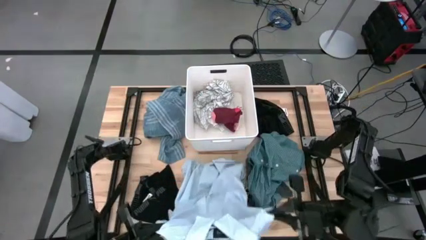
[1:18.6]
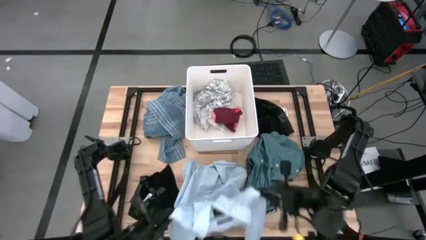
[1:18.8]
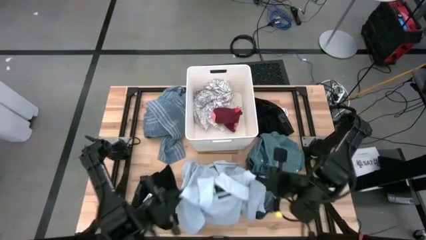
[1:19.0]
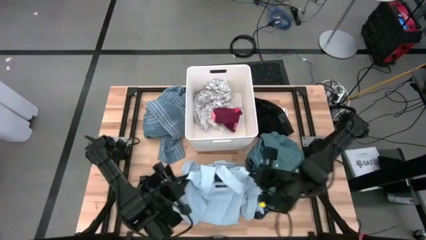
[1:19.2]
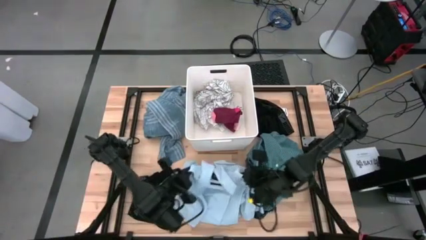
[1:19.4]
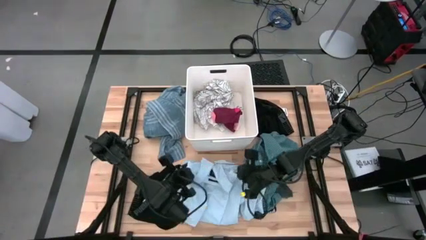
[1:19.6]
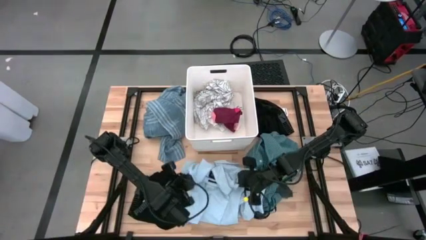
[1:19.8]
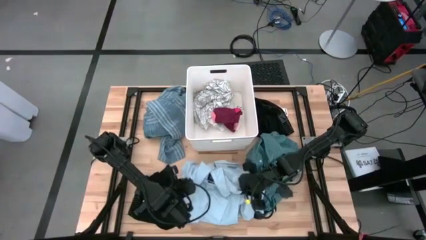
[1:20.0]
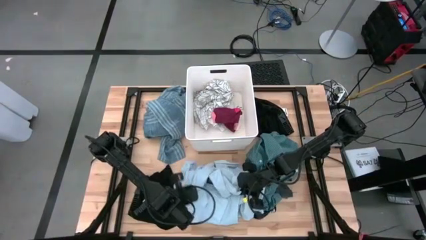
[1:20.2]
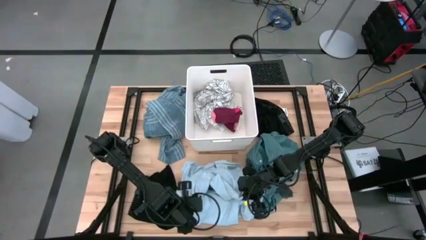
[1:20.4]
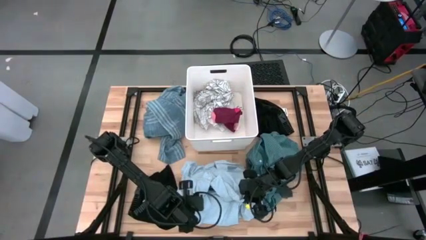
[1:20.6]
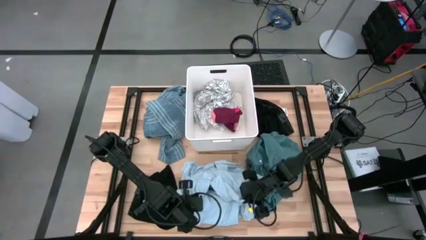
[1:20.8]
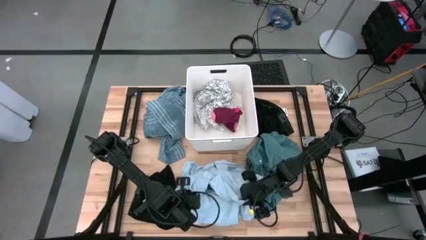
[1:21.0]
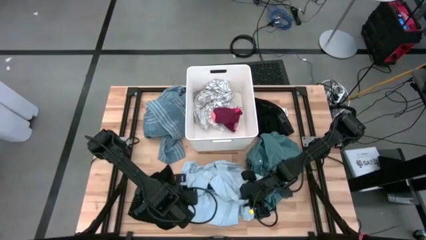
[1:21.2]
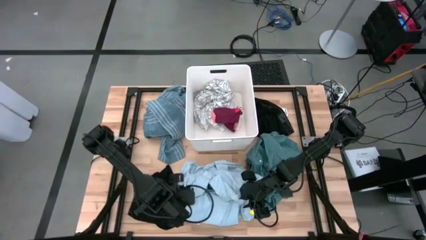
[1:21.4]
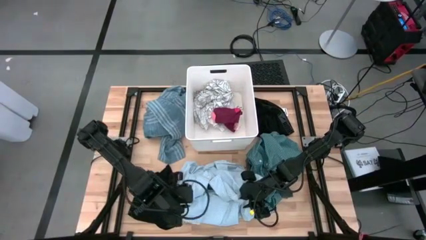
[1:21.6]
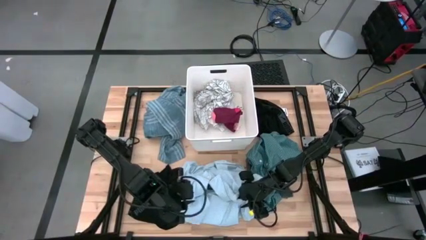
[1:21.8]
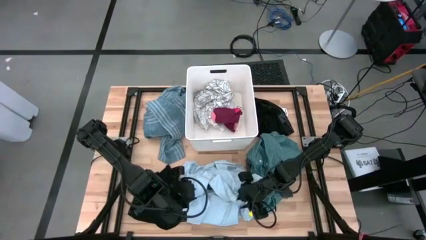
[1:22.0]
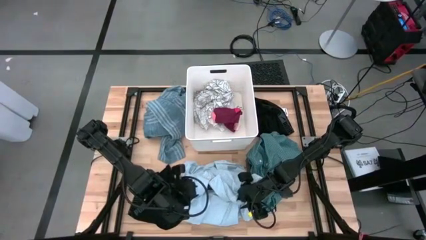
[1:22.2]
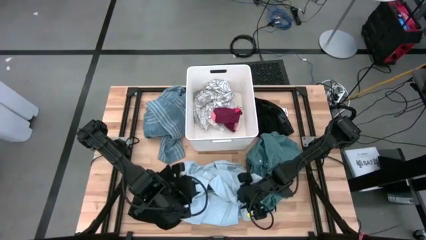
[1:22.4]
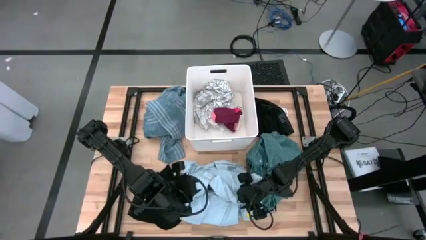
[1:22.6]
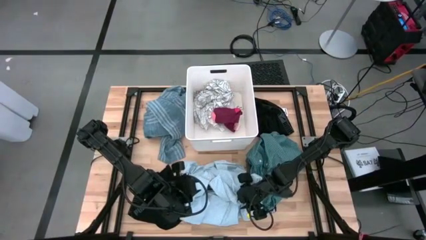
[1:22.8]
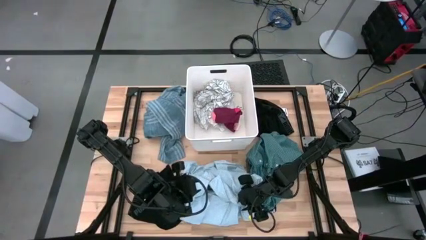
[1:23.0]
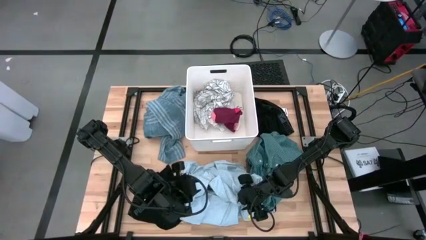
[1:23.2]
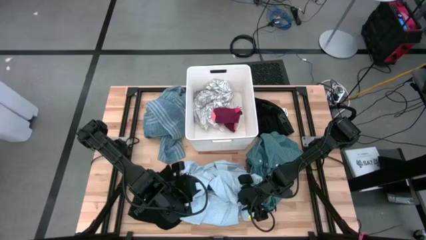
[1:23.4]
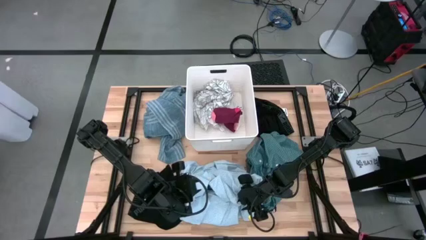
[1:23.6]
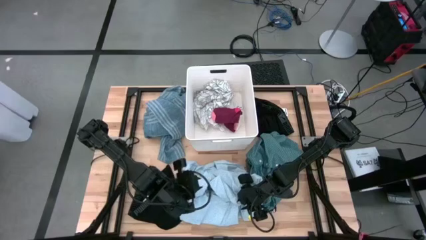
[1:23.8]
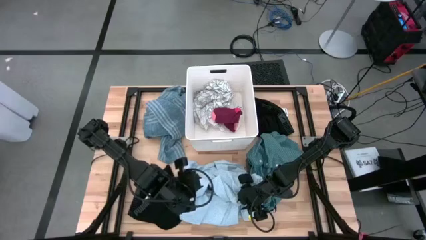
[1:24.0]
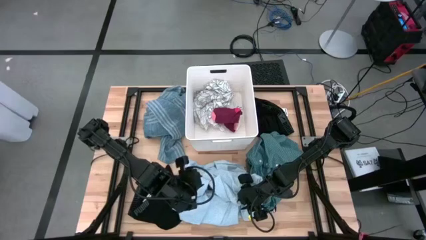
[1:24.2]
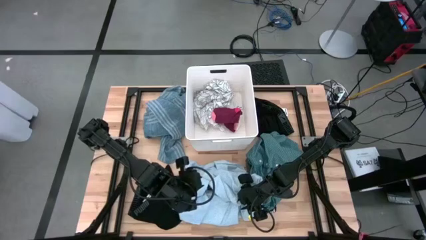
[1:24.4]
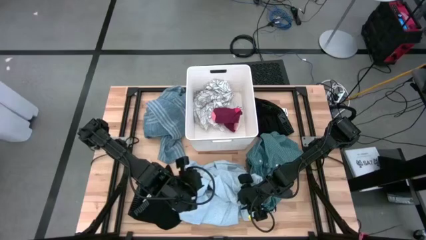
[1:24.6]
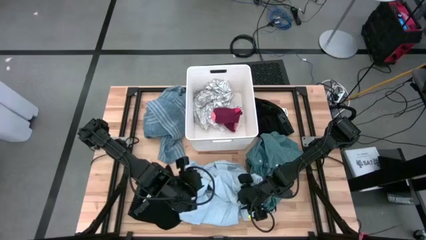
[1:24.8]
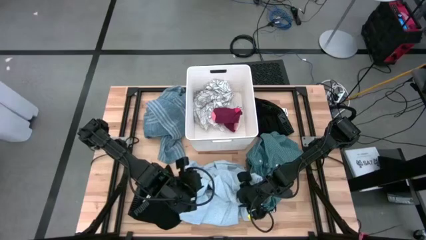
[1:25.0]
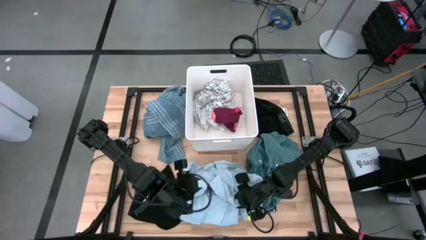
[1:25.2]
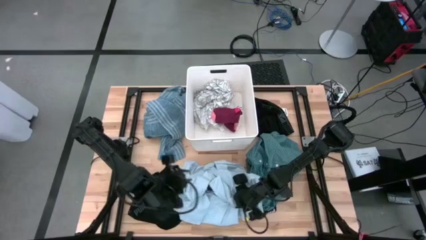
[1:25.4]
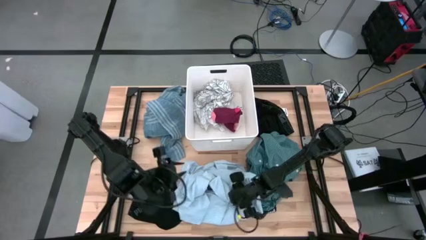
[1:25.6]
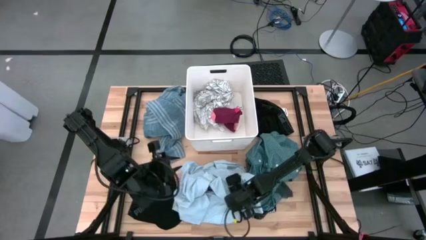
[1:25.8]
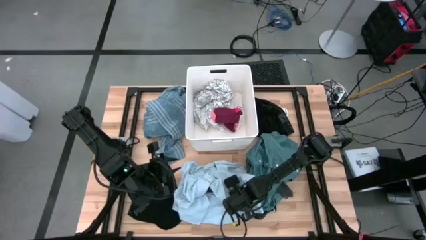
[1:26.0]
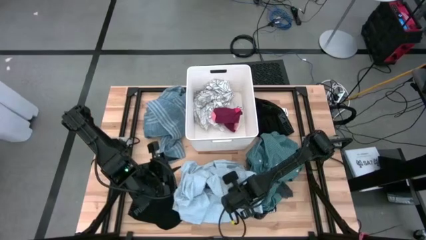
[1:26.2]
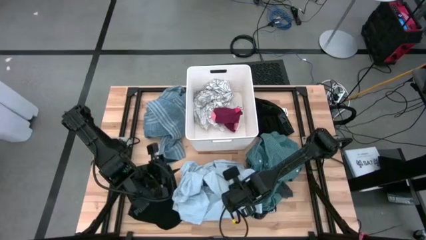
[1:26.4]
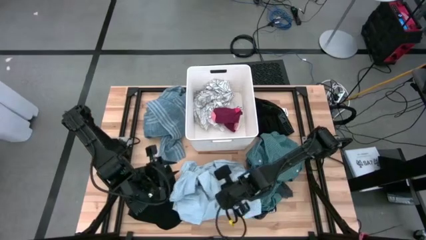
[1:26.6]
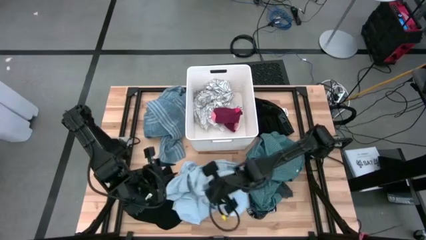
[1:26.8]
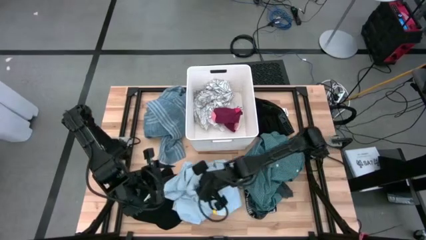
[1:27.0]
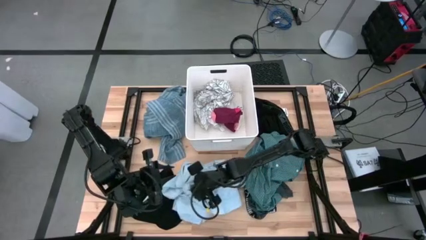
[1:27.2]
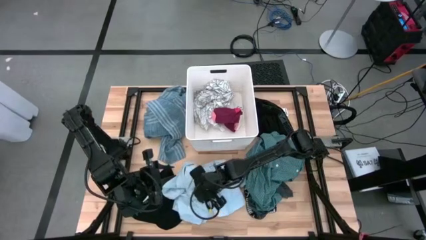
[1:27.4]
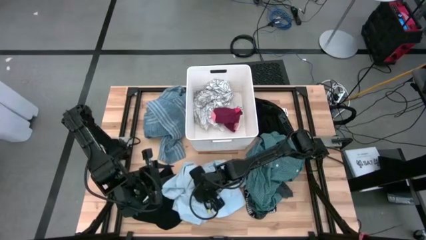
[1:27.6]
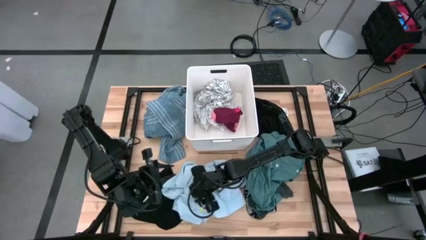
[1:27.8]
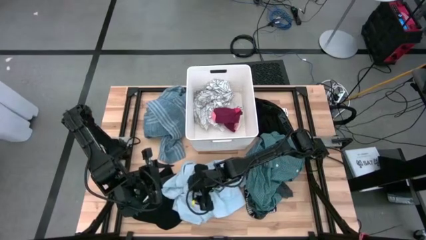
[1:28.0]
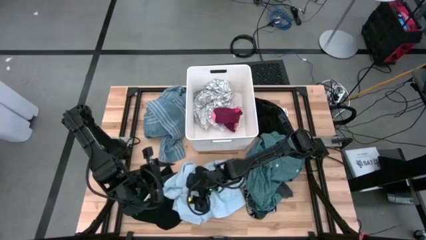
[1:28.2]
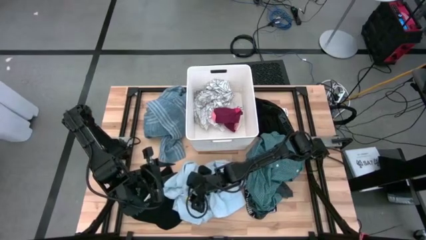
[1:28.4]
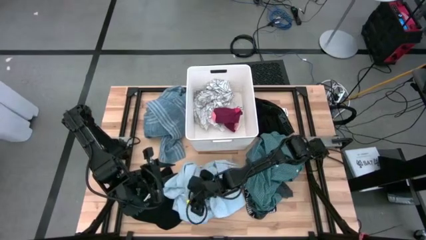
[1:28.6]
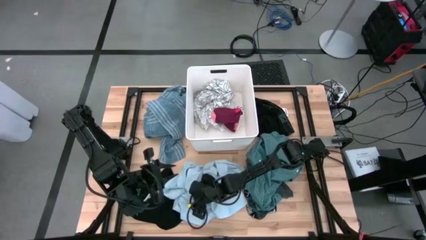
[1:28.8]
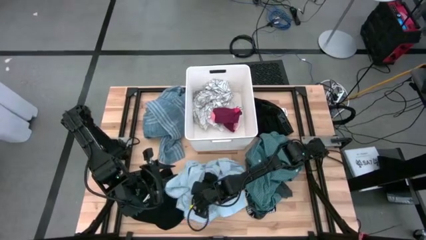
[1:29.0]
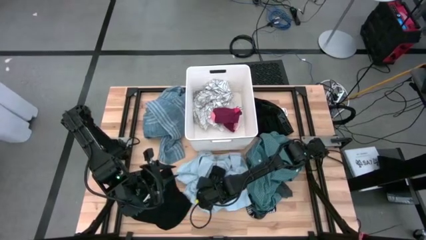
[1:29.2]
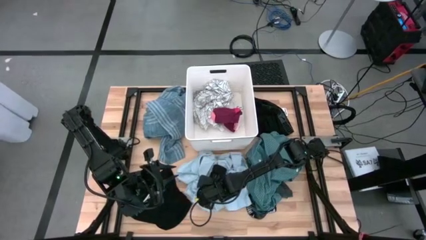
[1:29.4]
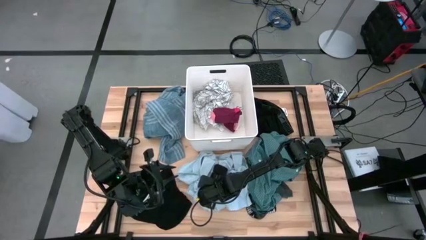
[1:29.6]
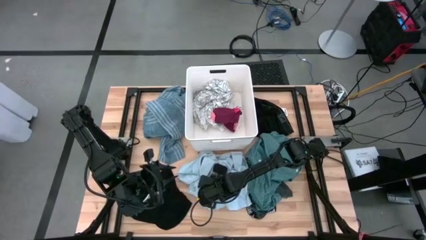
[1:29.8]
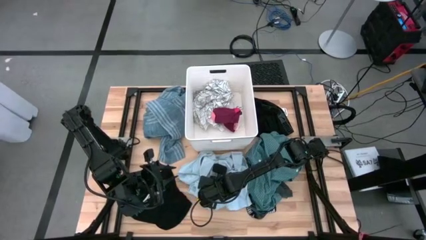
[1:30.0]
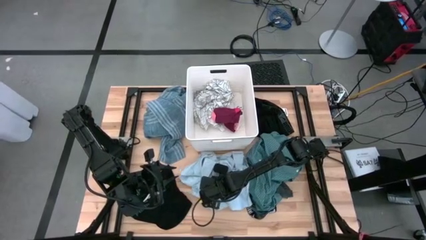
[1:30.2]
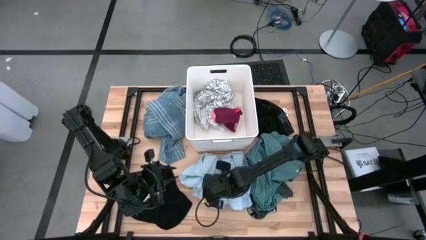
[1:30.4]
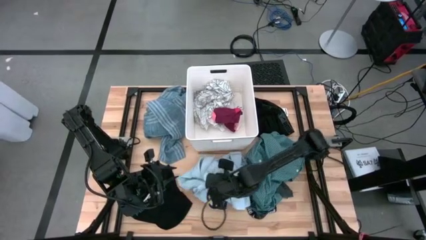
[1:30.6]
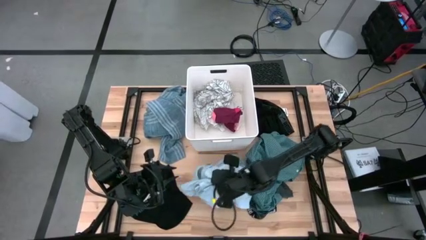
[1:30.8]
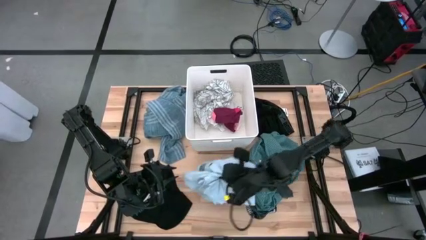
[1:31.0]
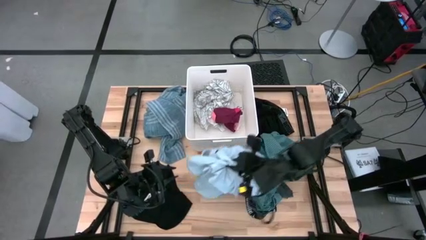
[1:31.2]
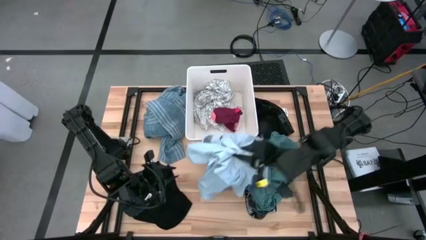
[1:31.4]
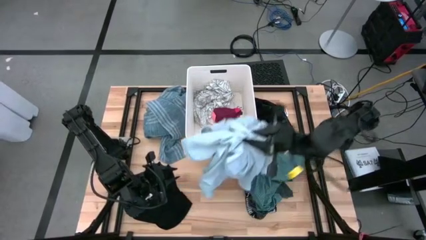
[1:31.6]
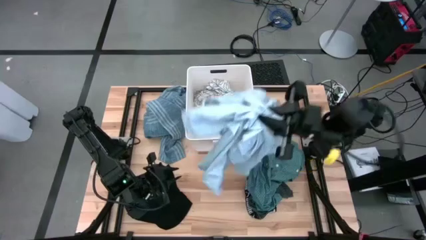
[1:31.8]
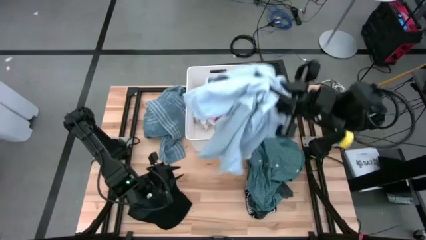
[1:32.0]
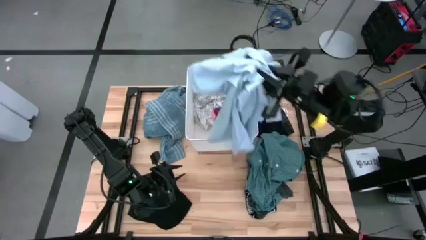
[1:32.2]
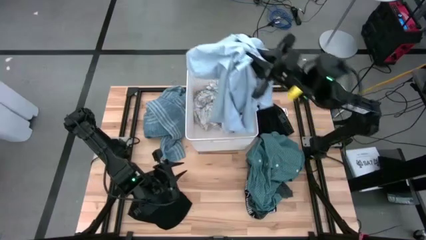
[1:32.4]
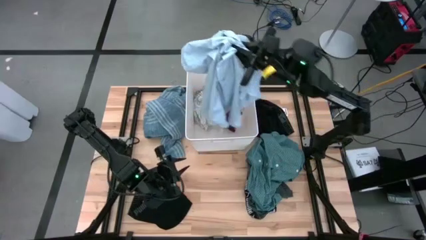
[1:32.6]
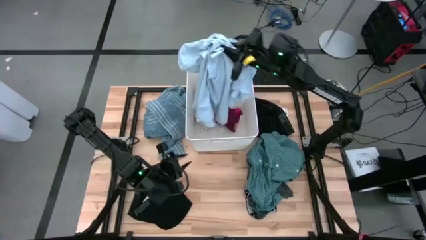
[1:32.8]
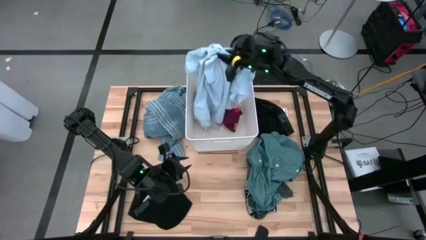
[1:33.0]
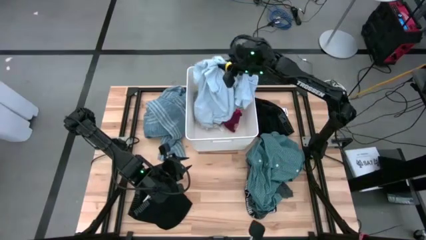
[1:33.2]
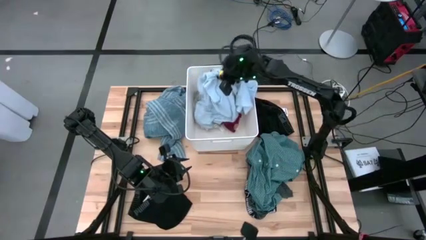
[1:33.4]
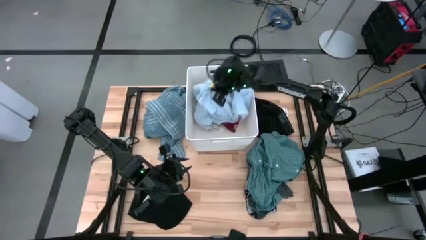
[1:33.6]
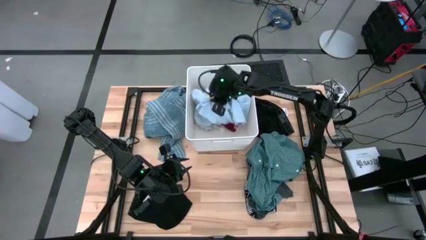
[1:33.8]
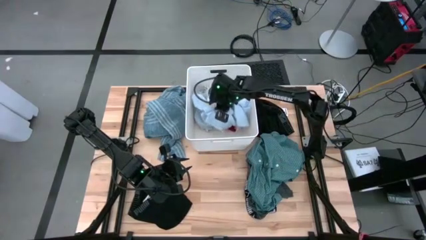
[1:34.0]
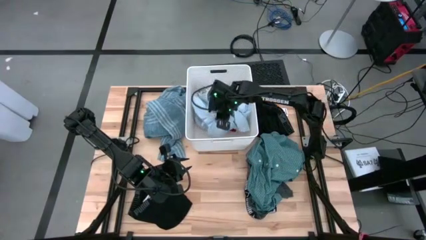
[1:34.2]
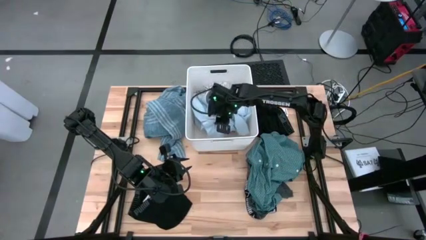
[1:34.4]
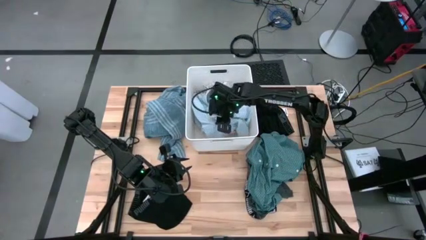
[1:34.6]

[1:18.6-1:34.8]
Task: Sort clothes
Put the light blue shirt into the white bin
